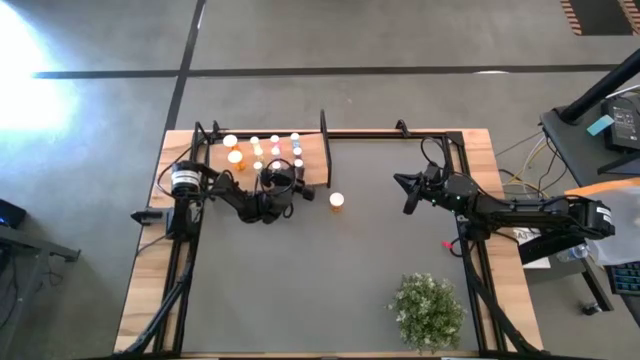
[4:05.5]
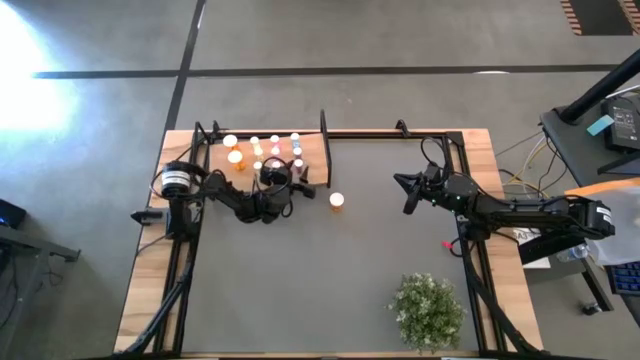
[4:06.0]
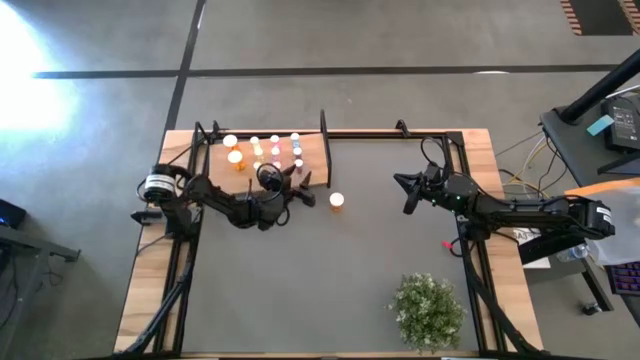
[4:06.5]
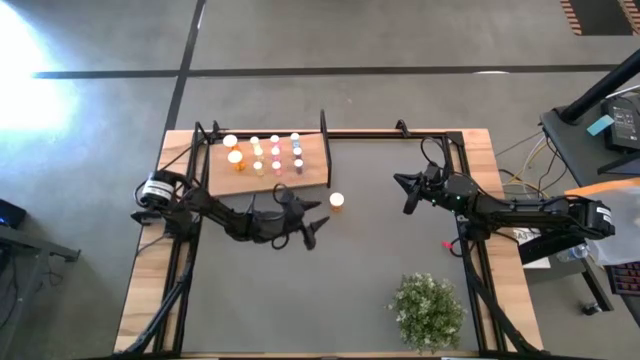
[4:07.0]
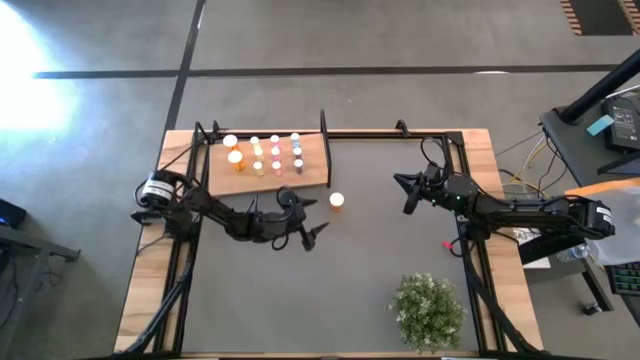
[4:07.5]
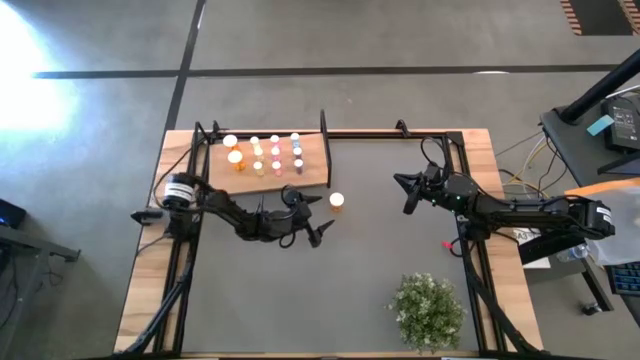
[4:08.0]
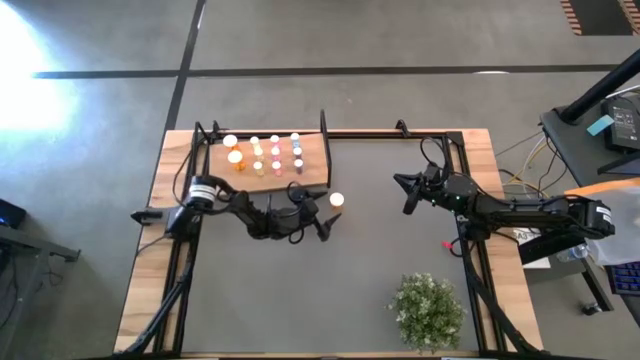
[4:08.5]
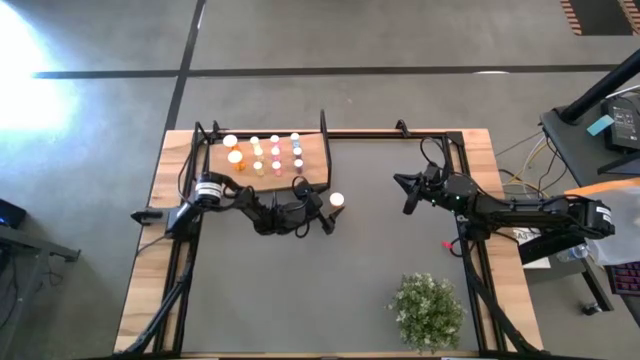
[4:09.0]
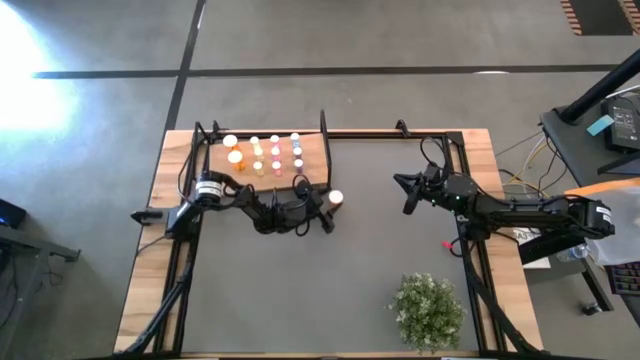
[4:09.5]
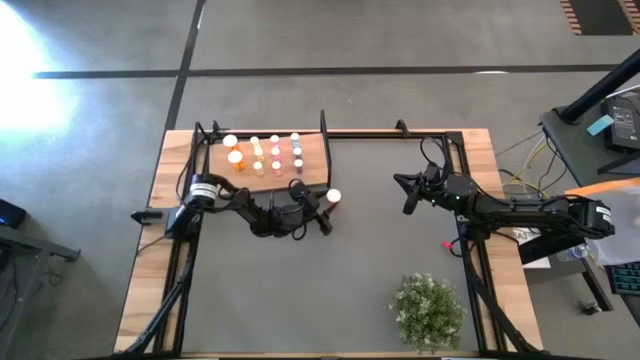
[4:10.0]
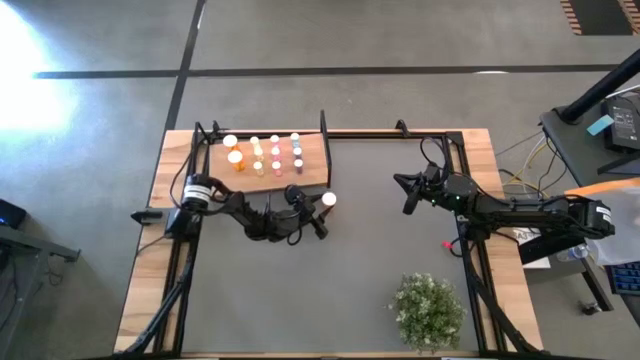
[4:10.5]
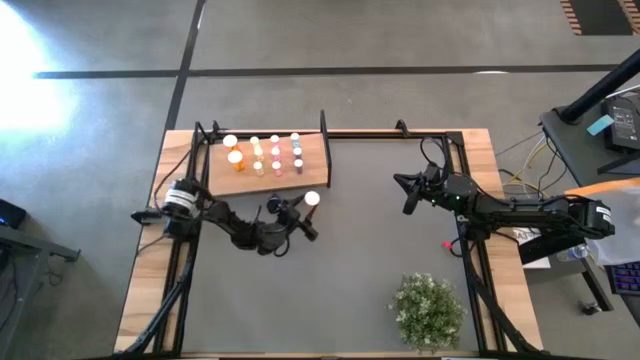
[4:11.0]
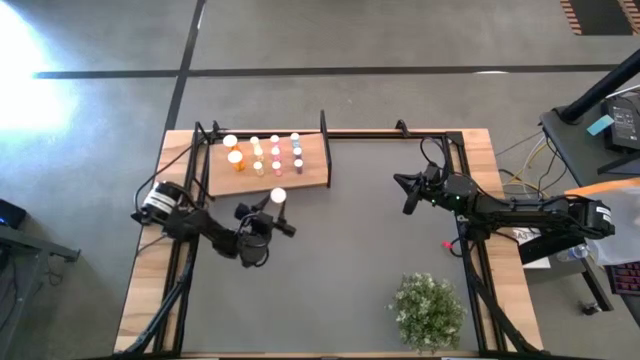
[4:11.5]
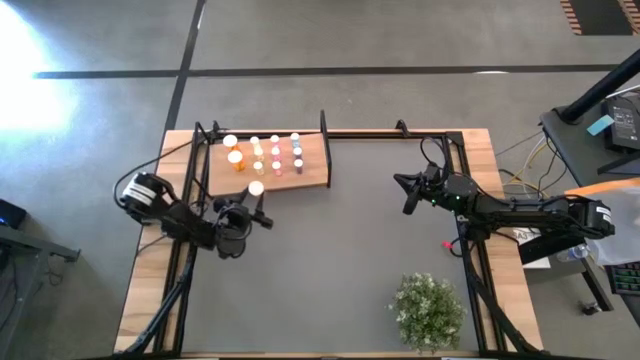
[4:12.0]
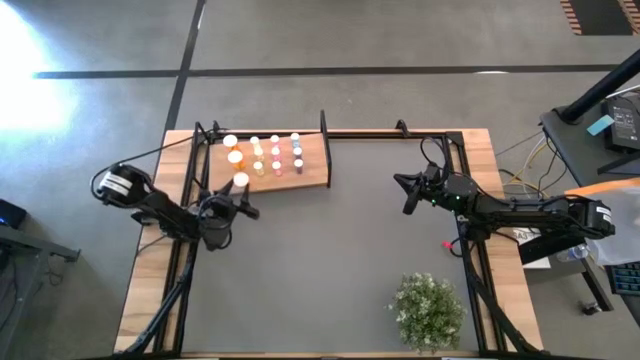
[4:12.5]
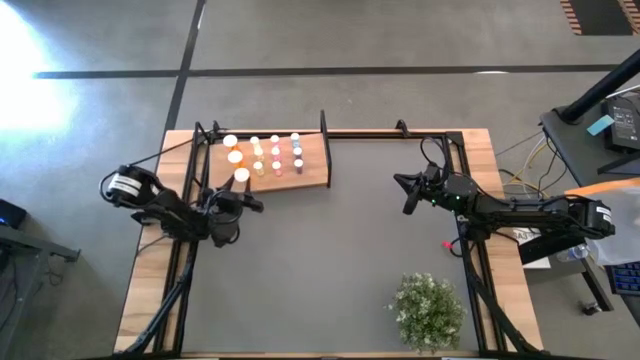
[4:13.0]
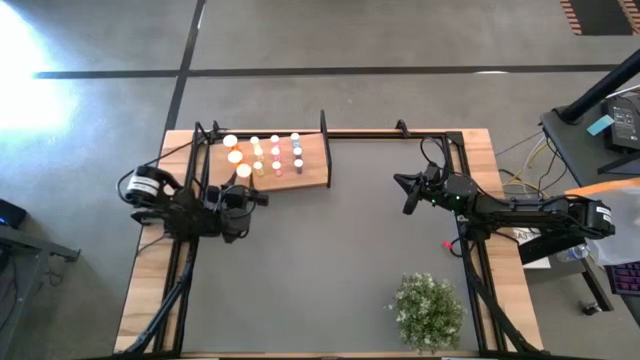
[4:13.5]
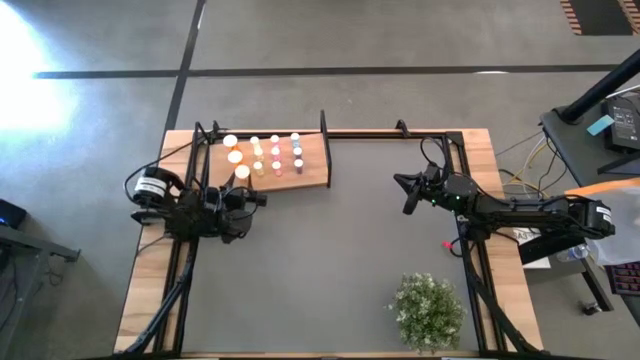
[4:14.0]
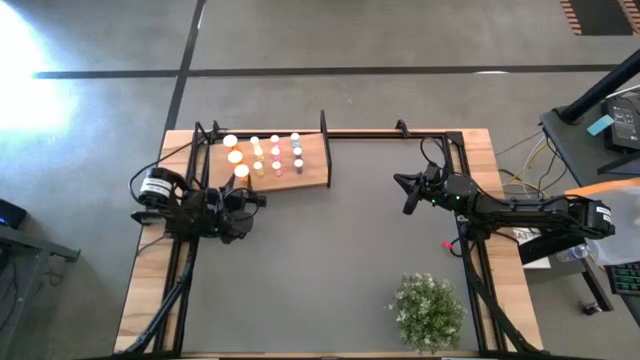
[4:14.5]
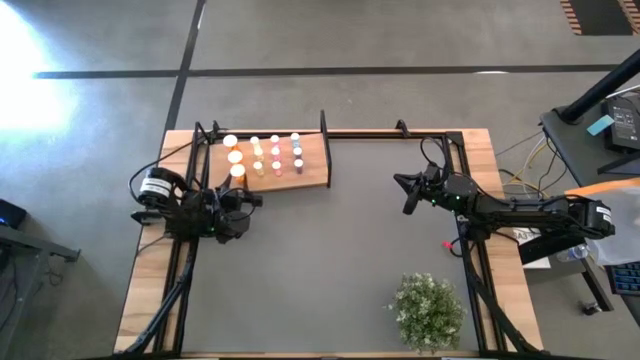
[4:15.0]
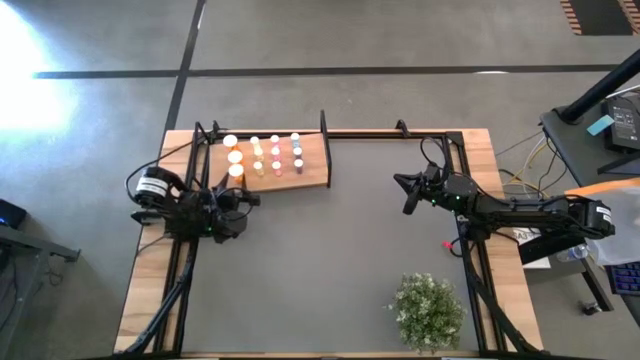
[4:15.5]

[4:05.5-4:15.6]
Task: Pick and place medicine bottles onto shelf by color
Put the orange pill bottle on the shelf aligned with the other orange pill bottle

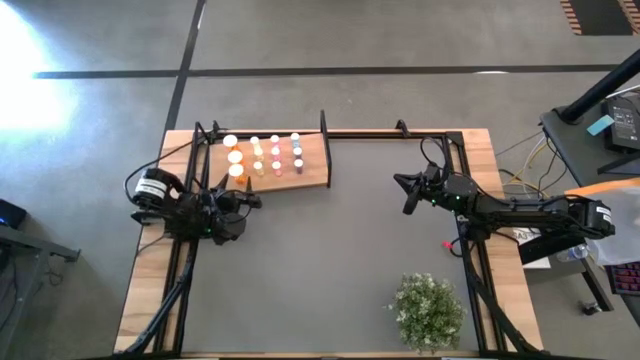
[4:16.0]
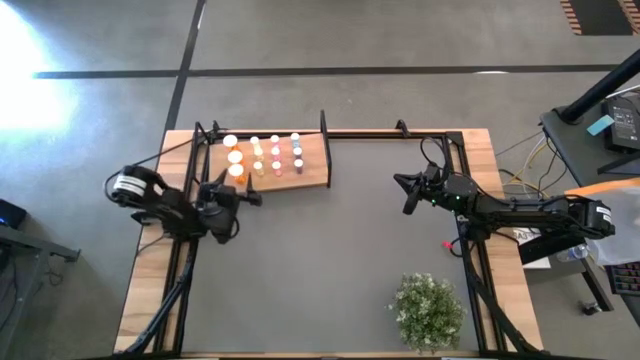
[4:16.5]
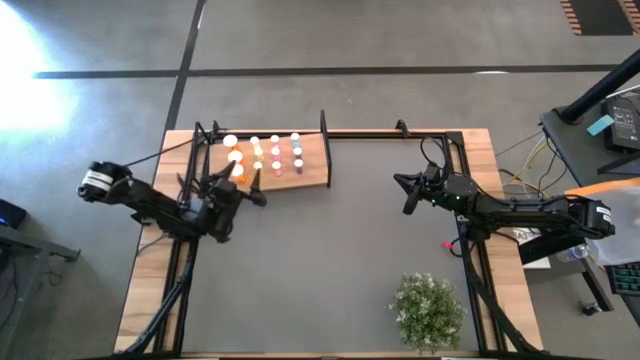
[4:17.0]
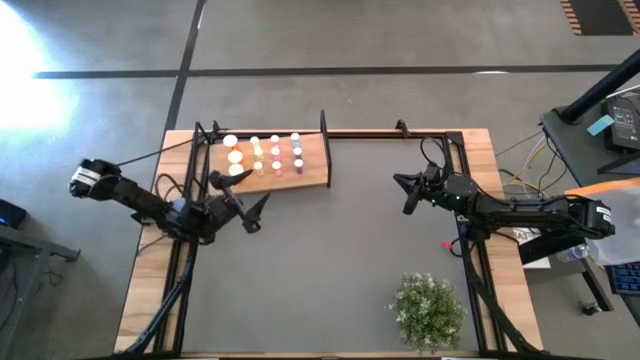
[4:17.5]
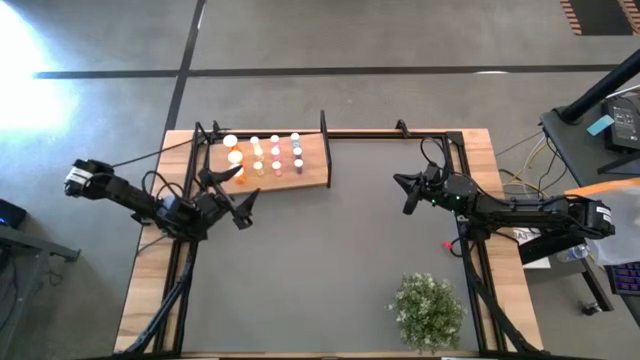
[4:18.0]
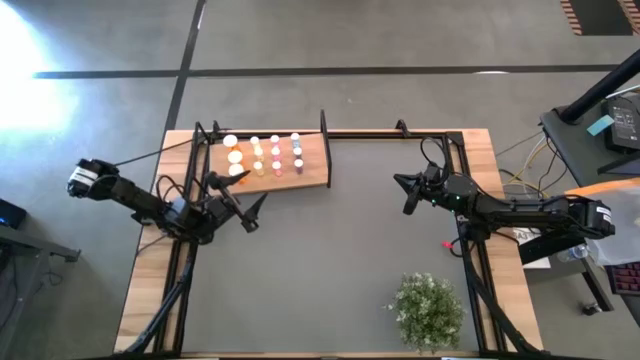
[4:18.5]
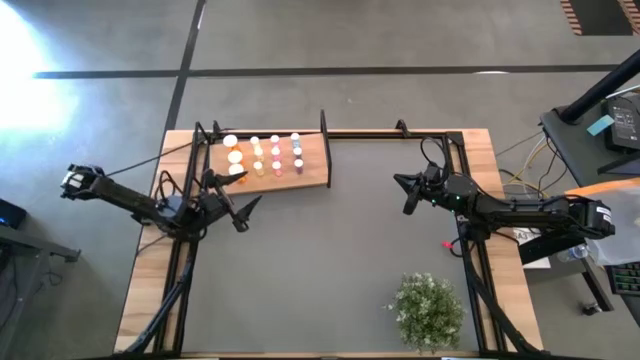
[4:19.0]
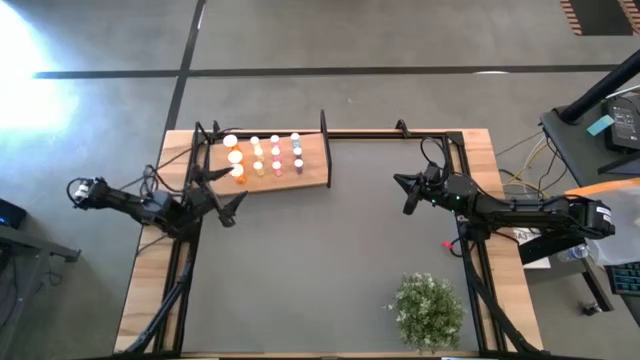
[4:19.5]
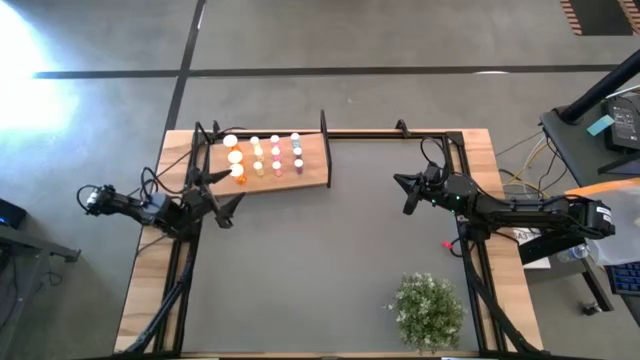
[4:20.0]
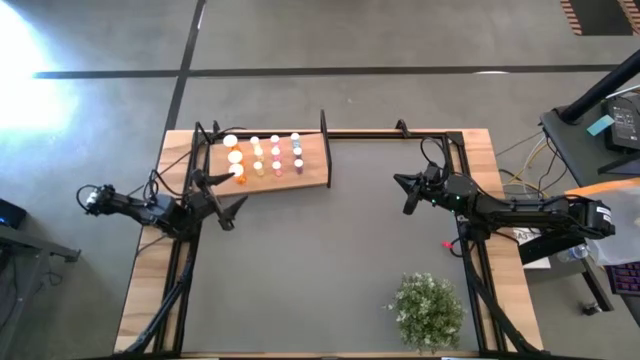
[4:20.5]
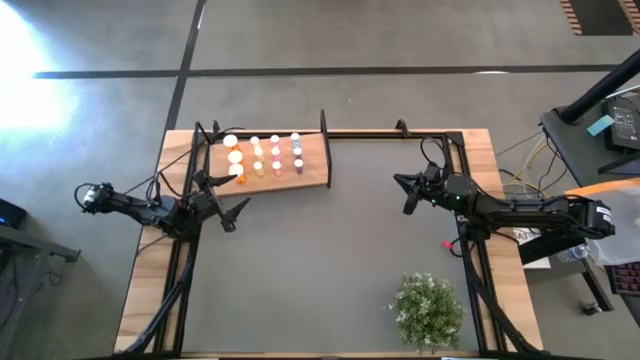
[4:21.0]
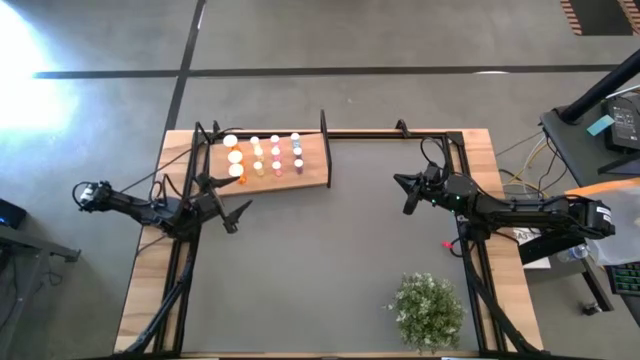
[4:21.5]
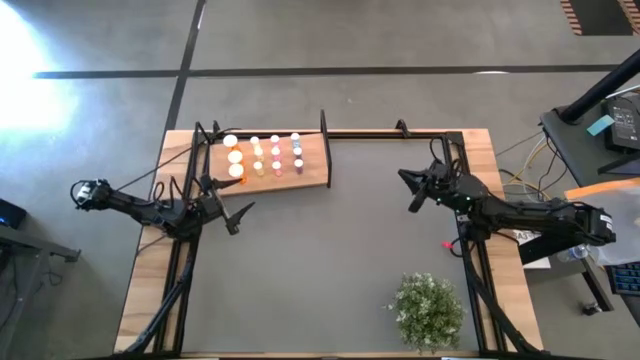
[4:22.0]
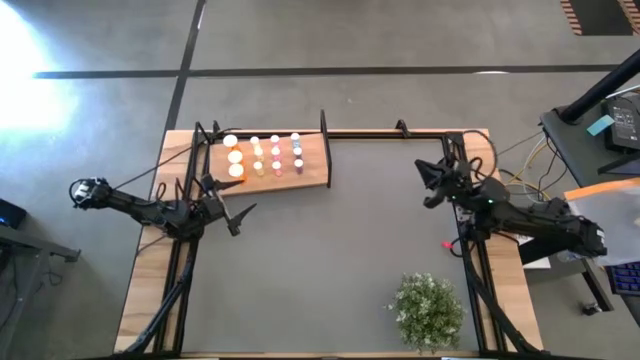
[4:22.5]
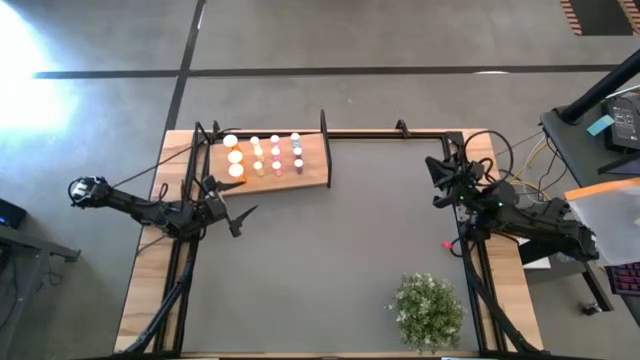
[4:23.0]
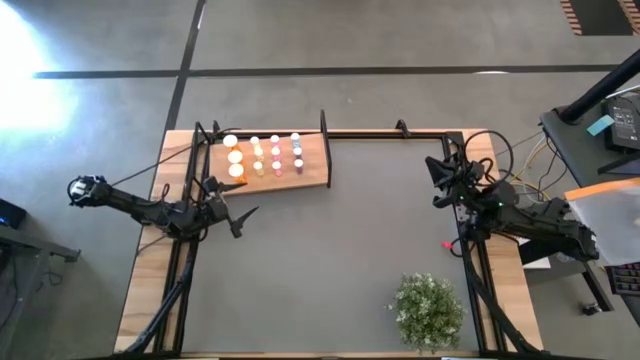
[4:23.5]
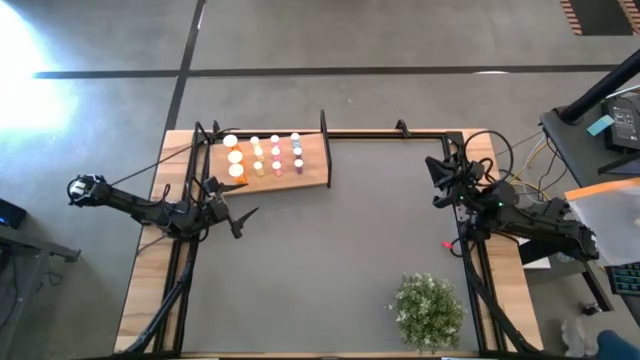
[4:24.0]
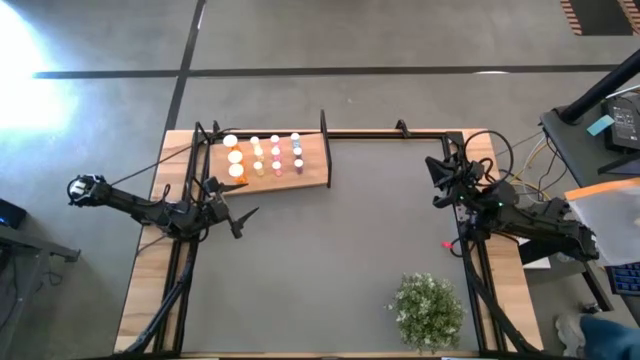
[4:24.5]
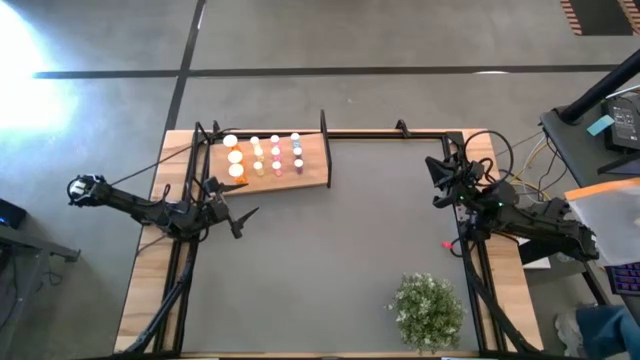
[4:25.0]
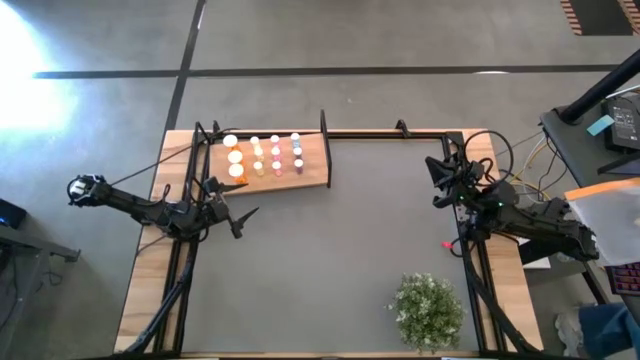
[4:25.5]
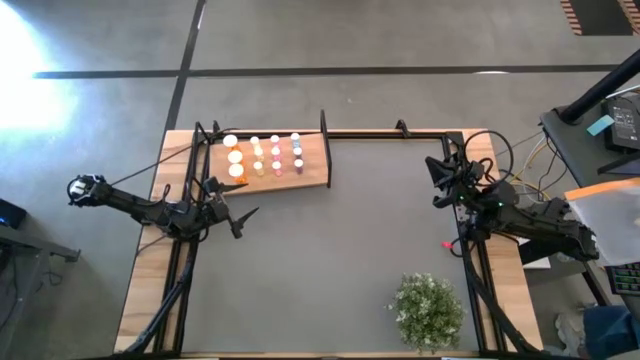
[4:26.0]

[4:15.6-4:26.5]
Return to Home Position
